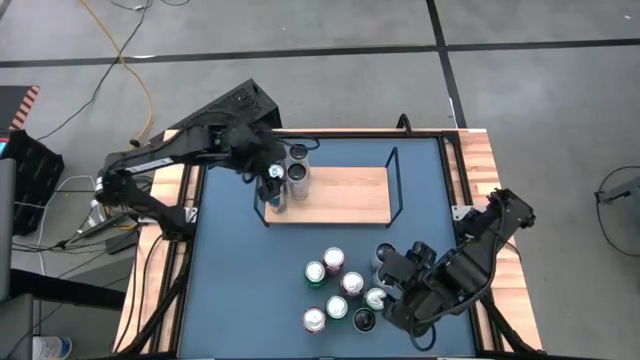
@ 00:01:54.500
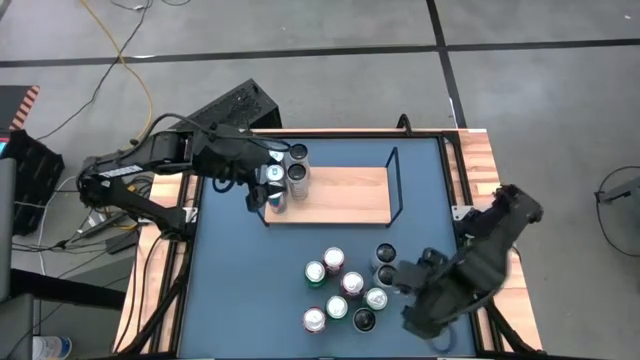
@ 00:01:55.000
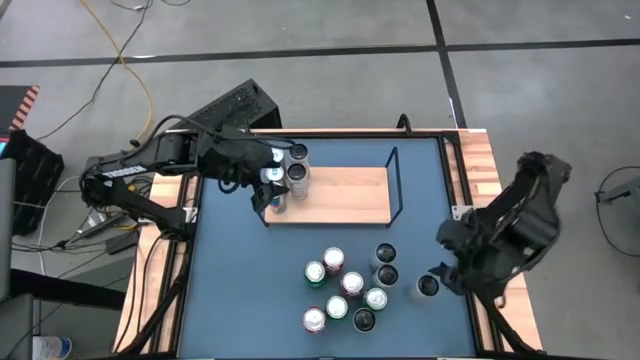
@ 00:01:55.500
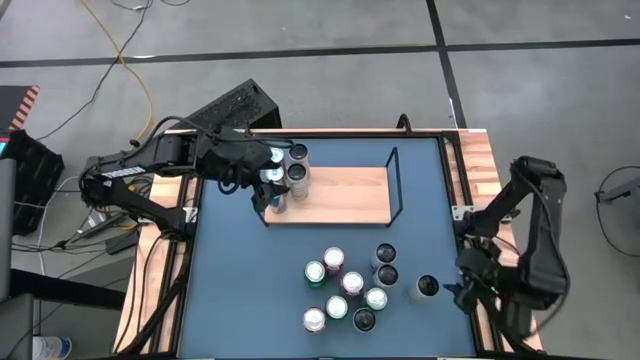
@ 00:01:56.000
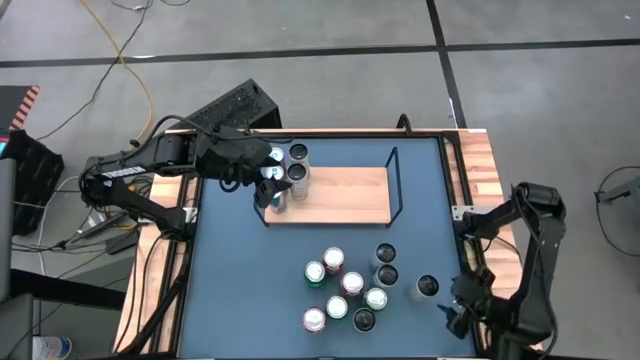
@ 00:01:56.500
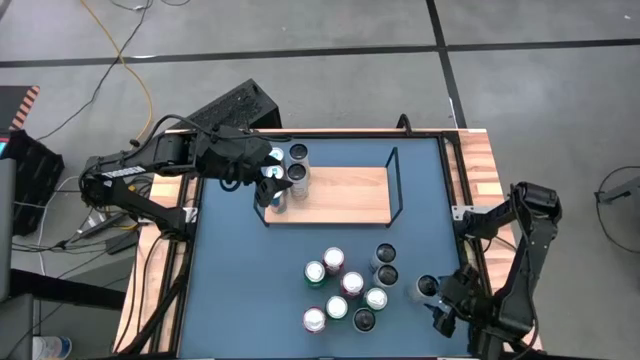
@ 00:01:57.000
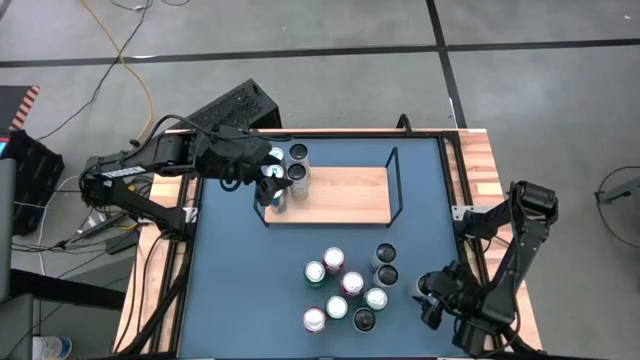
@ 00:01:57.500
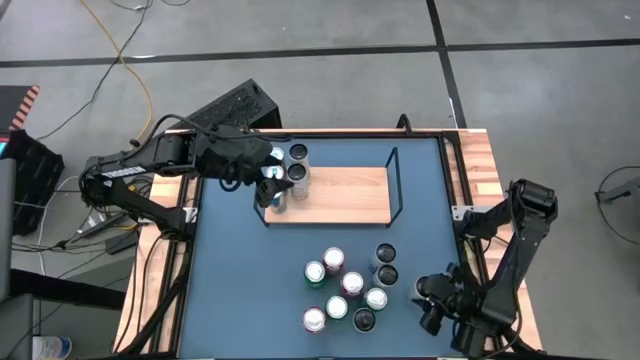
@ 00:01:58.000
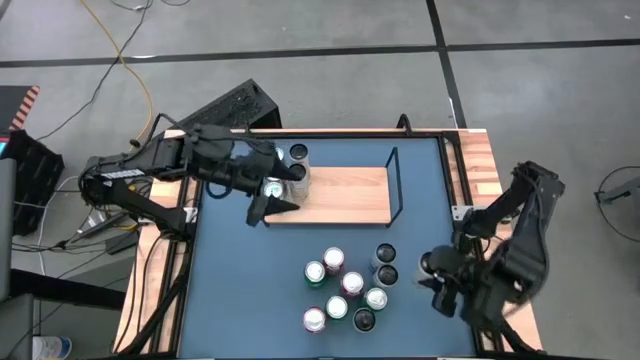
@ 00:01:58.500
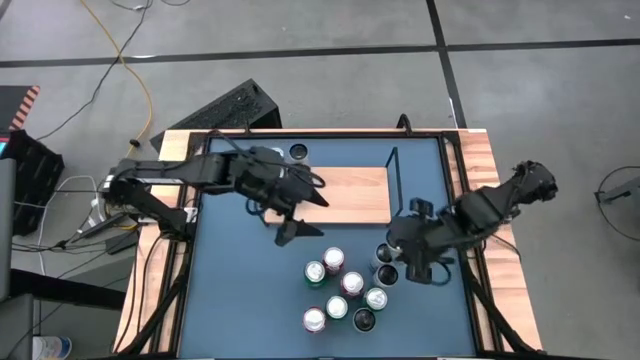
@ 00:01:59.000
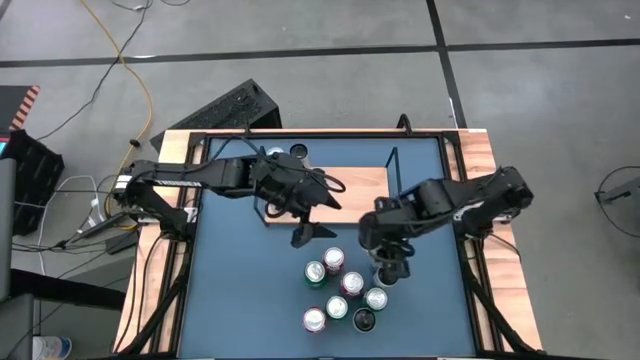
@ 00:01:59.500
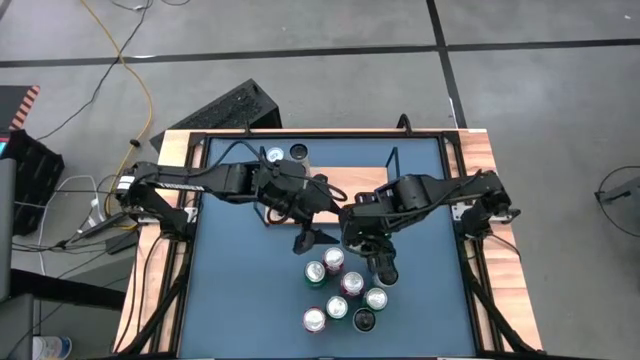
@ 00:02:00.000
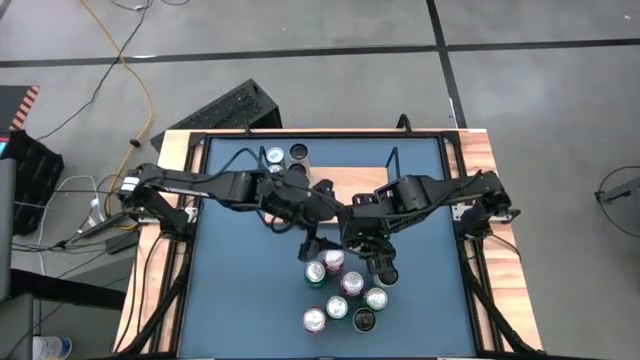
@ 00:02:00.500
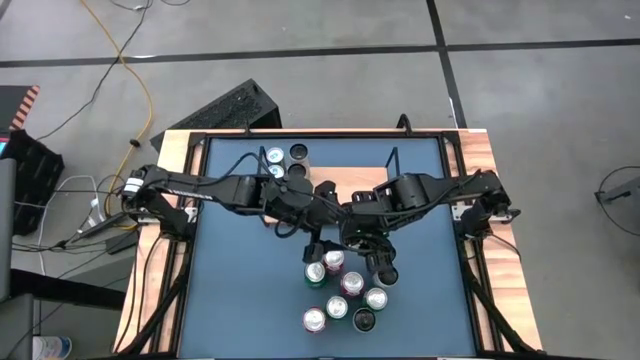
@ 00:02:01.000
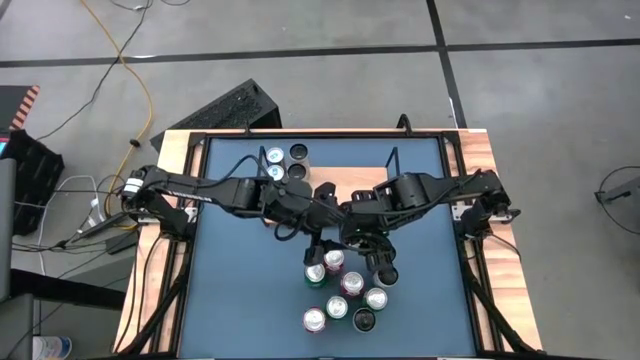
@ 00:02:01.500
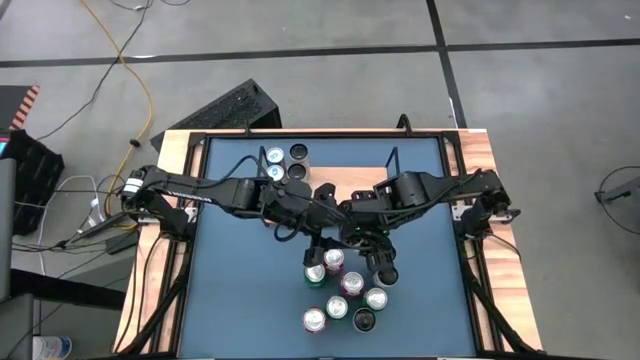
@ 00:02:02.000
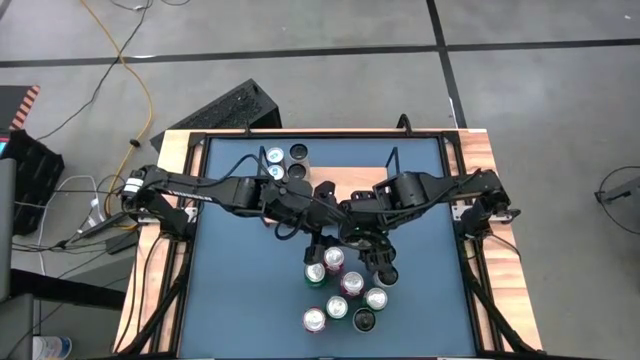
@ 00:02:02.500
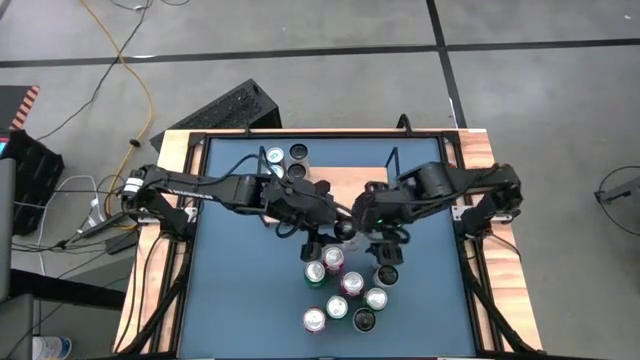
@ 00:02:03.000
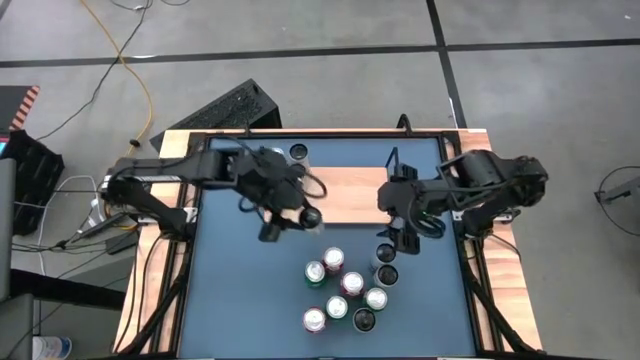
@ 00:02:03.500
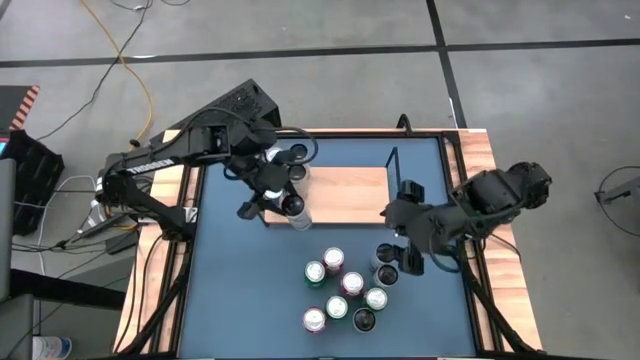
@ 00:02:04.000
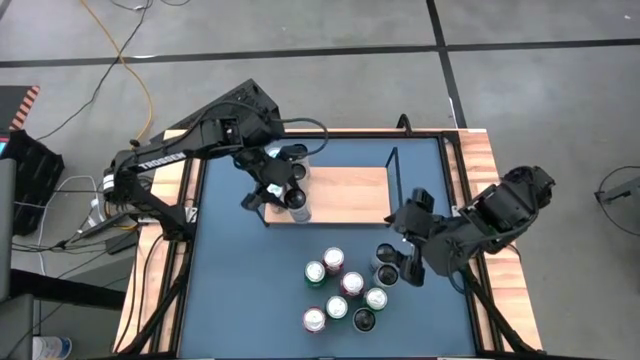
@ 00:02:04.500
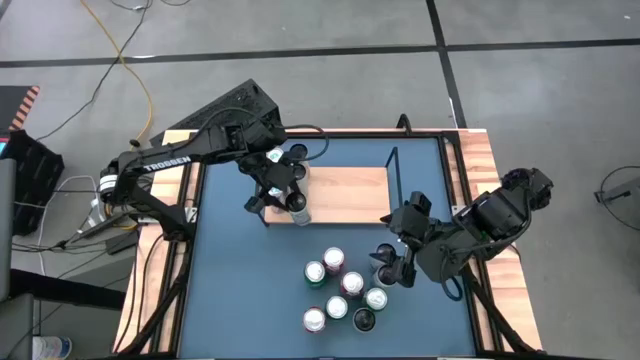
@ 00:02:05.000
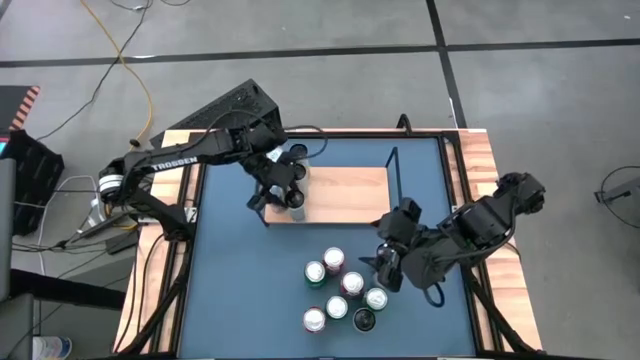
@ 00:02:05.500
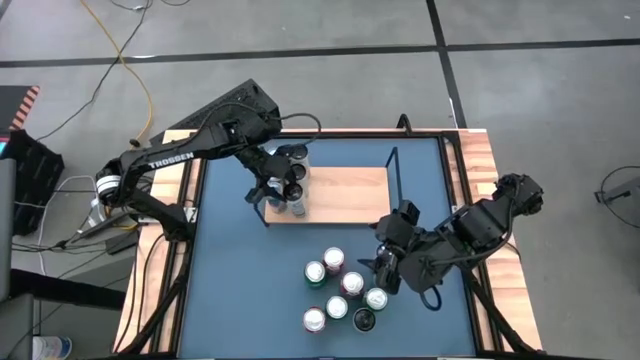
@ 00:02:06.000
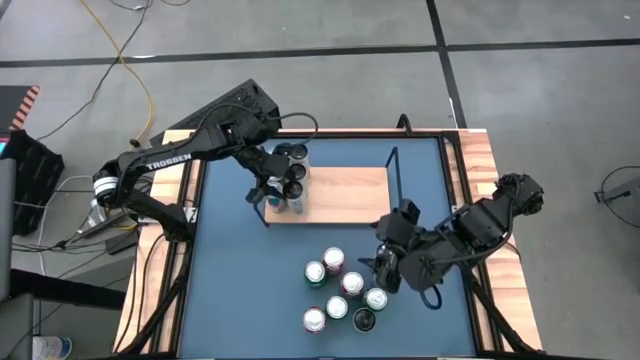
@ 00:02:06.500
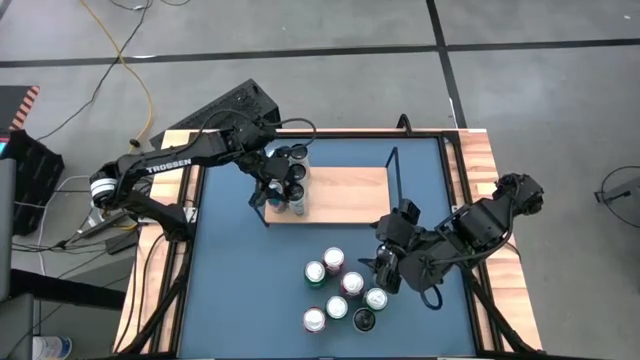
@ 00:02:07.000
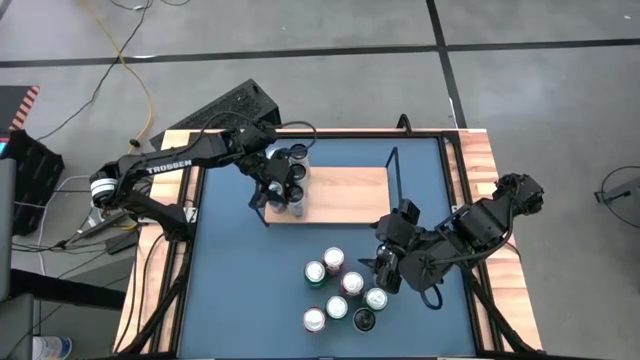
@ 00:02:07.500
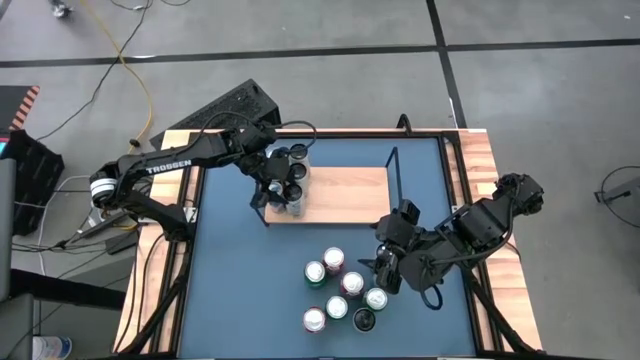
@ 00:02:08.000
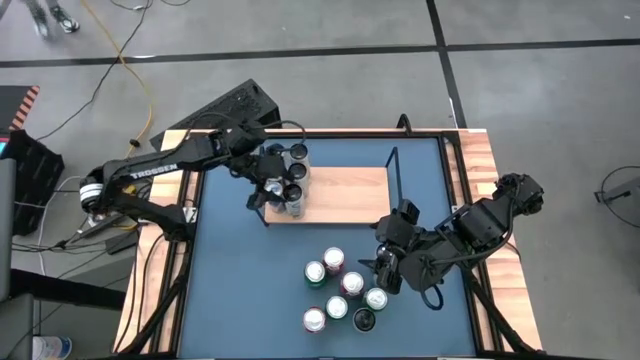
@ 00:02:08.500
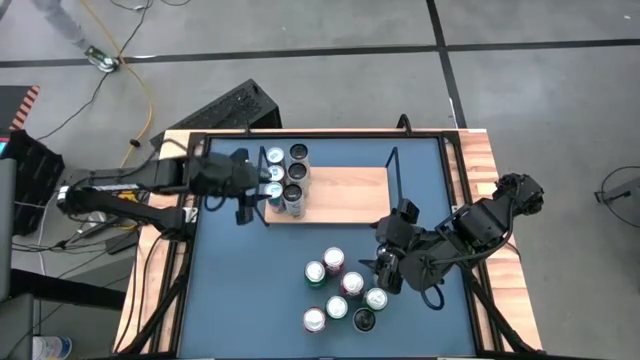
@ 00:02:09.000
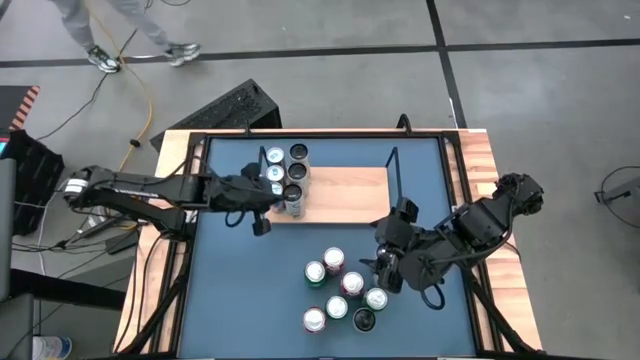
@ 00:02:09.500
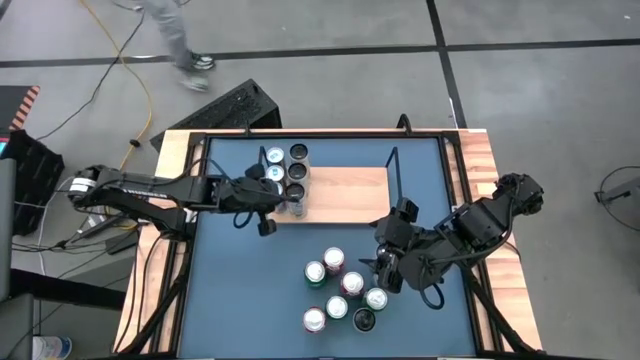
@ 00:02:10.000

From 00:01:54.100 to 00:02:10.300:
Task: Place canned beverage on shelf
Put the white and orange soda can on the shelf aligned with the other white and orange soda cans
